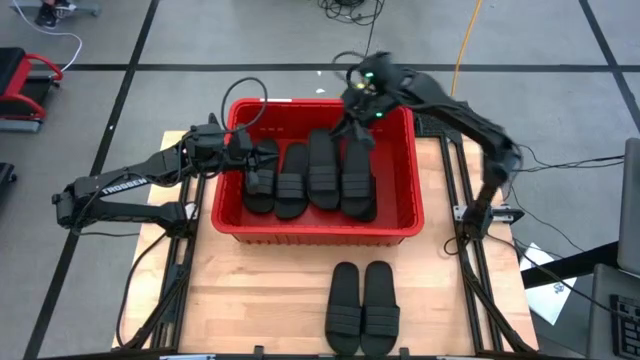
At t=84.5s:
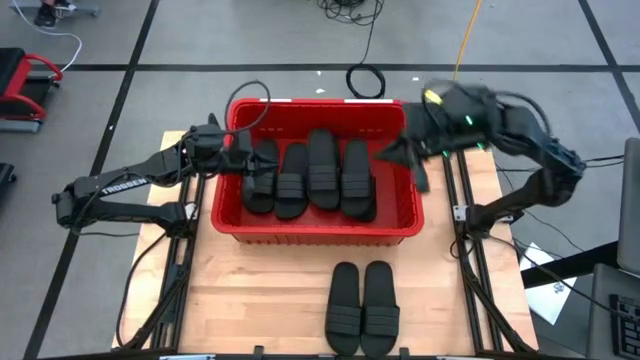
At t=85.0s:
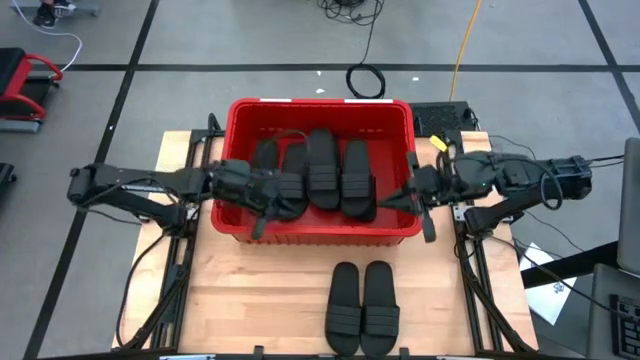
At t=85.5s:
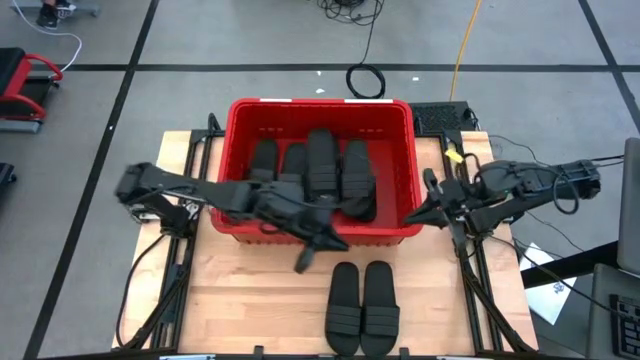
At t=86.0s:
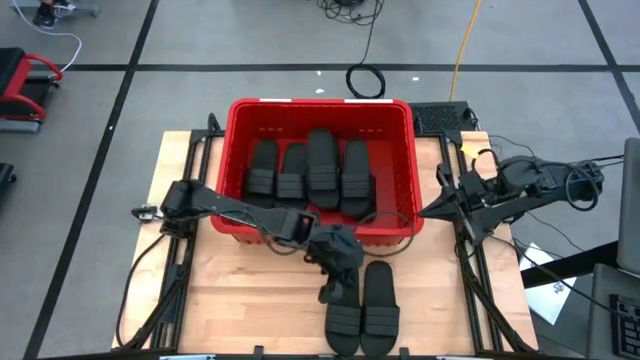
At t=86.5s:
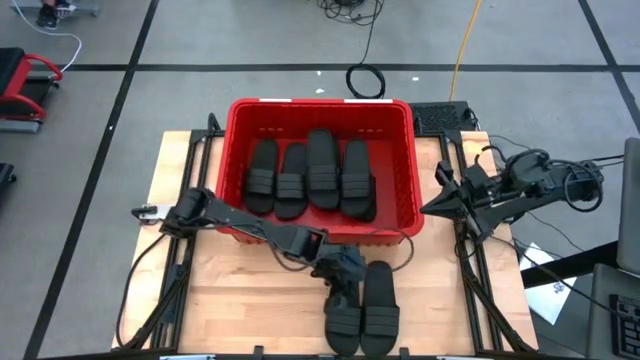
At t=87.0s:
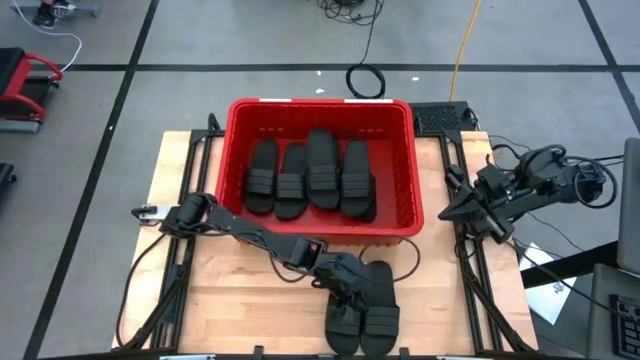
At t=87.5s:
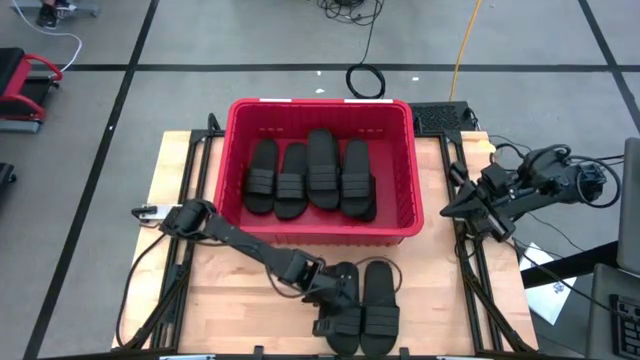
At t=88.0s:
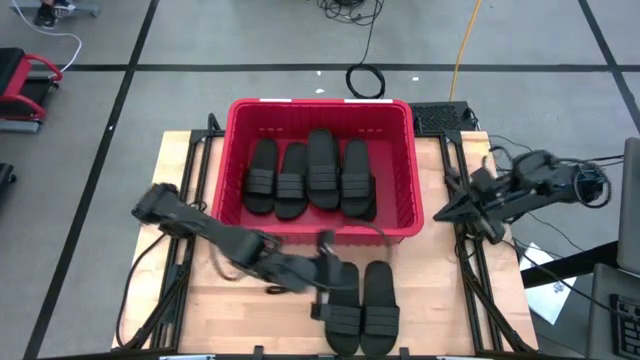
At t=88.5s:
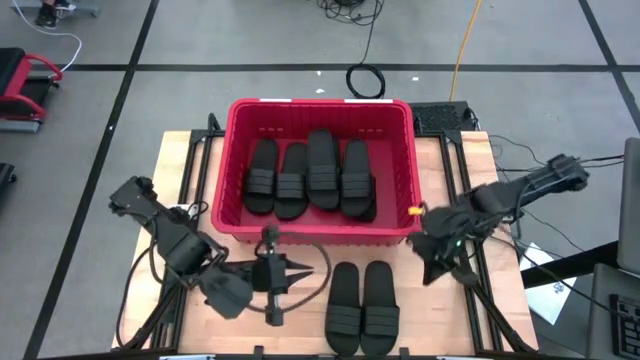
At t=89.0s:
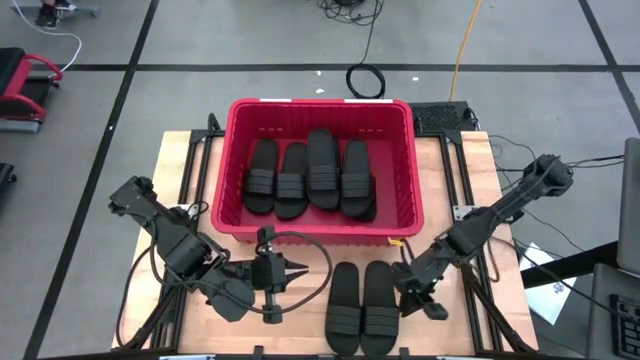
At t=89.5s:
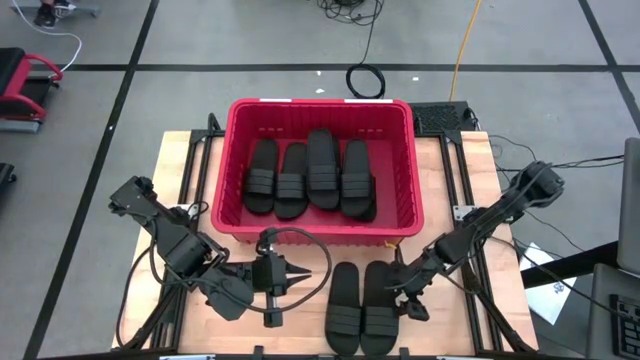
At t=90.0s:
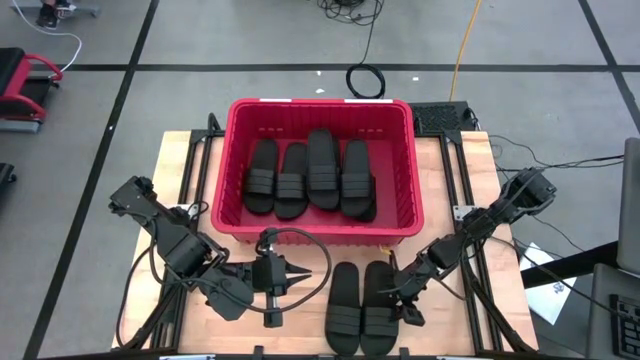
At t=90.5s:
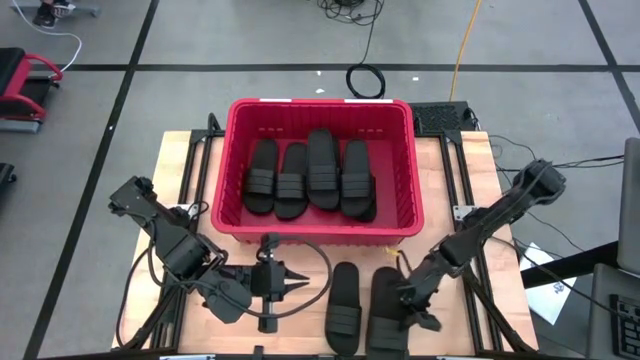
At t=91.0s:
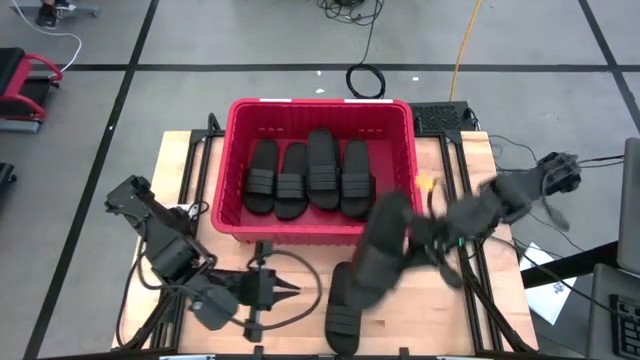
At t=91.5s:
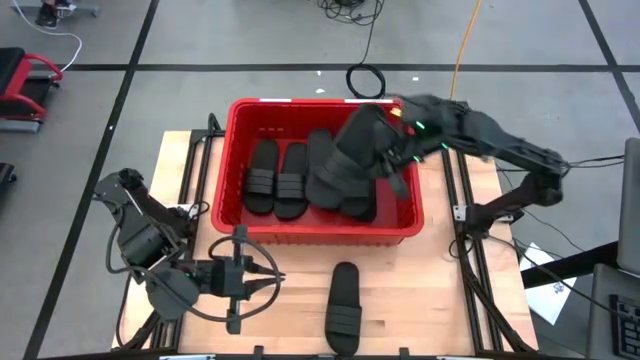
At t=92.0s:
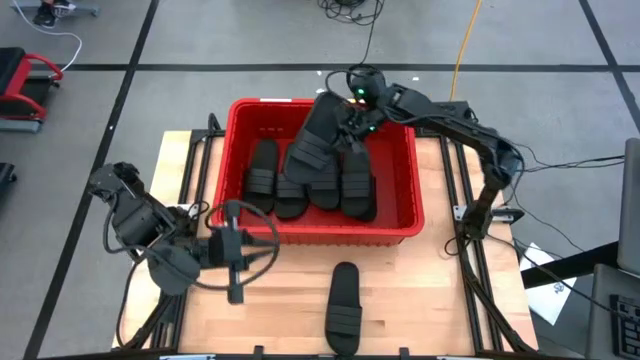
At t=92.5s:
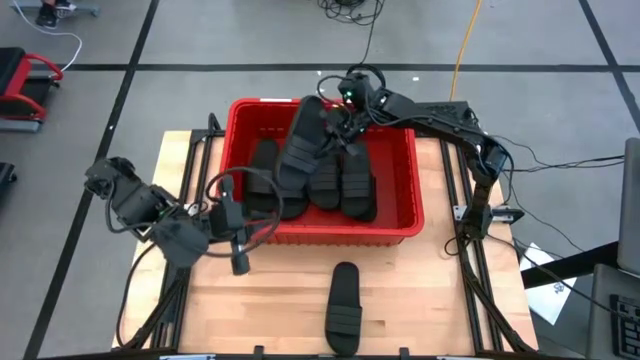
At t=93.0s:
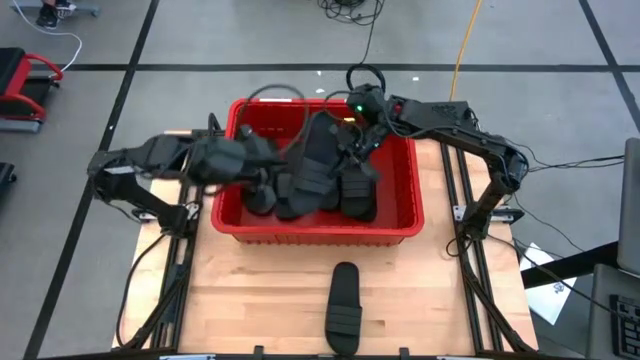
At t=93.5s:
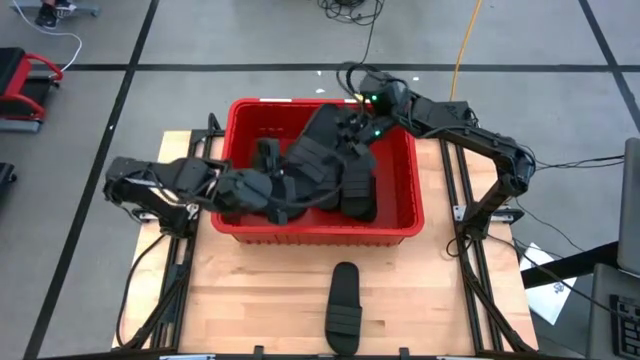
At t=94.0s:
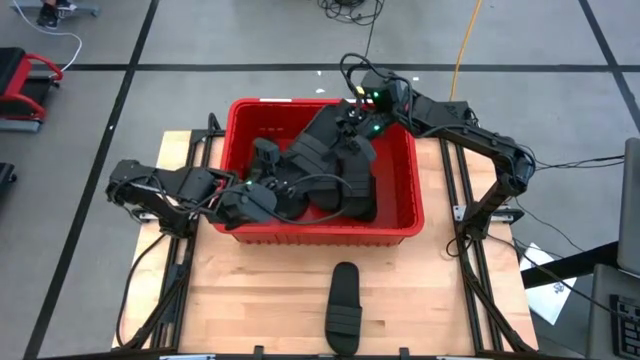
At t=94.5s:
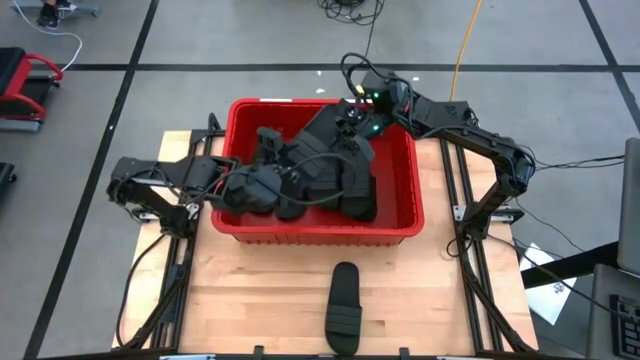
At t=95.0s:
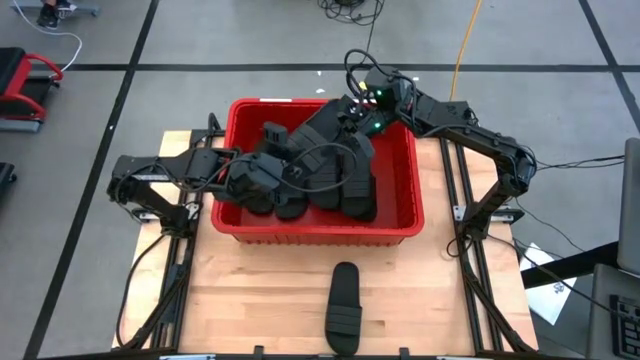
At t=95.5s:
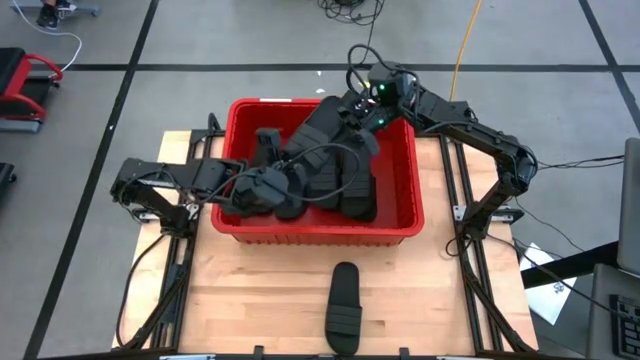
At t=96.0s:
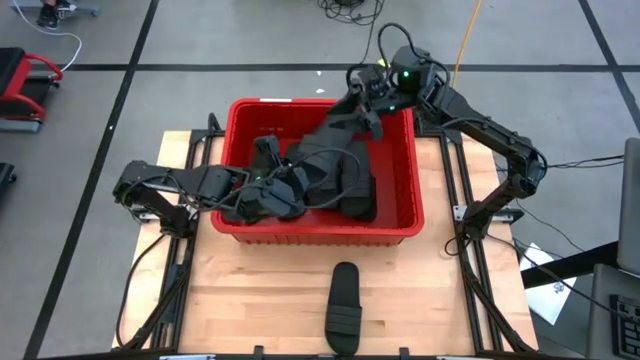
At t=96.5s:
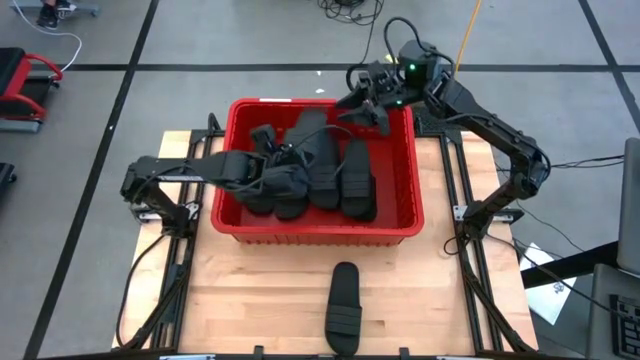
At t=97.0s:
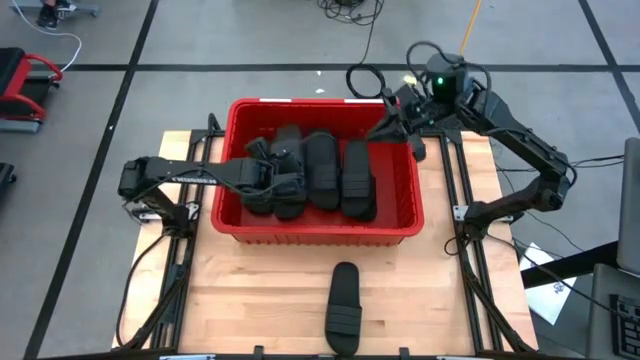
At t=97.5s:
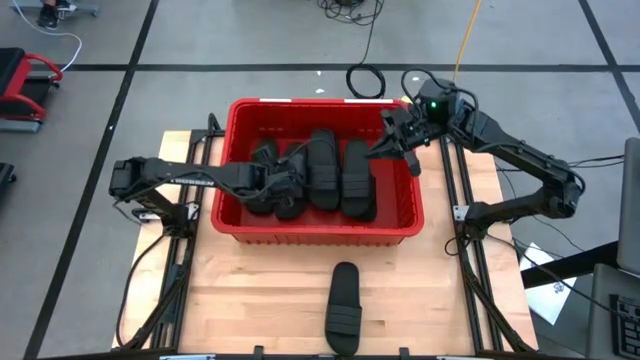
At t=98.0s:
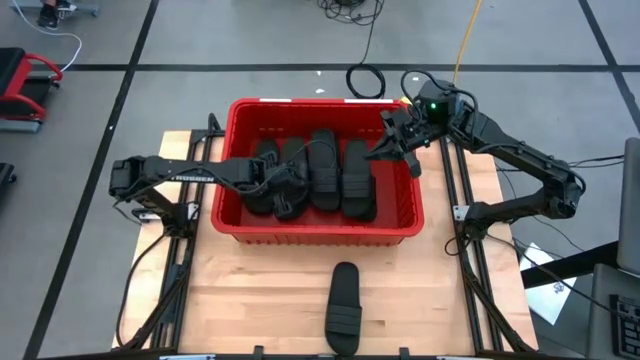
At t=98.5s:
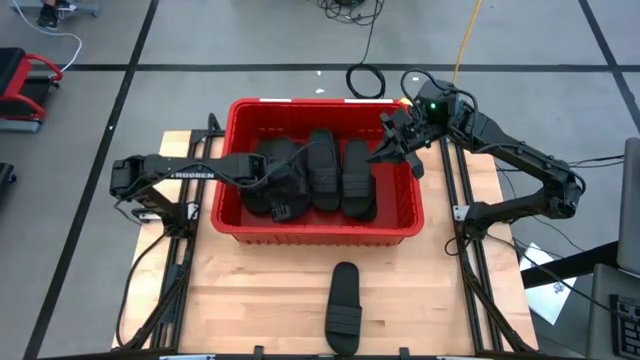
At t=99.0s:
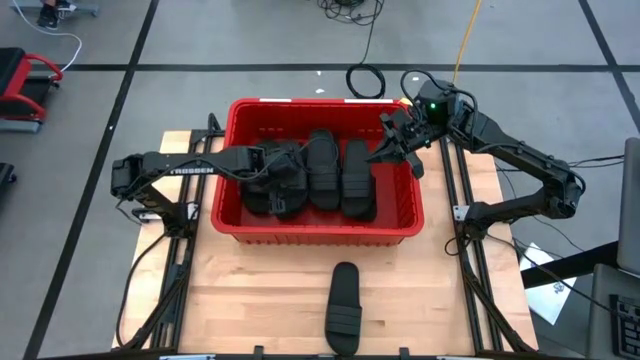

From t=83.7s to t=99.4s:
Task: Pick and place slides into bin
Put the black slide into the red bin

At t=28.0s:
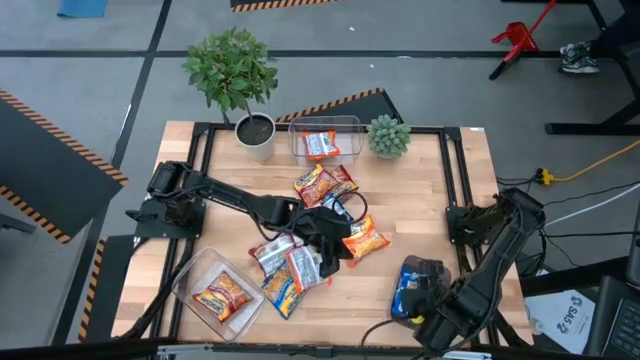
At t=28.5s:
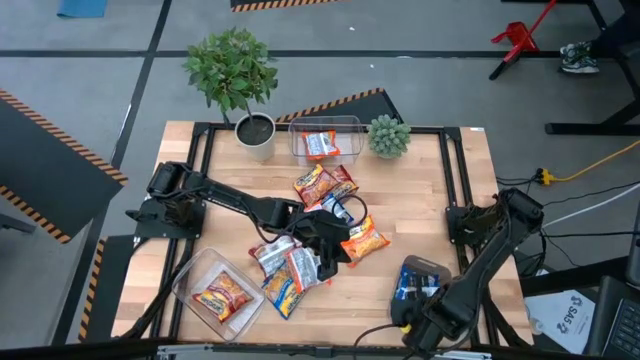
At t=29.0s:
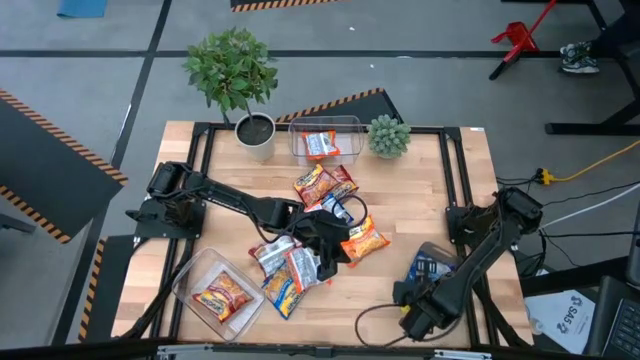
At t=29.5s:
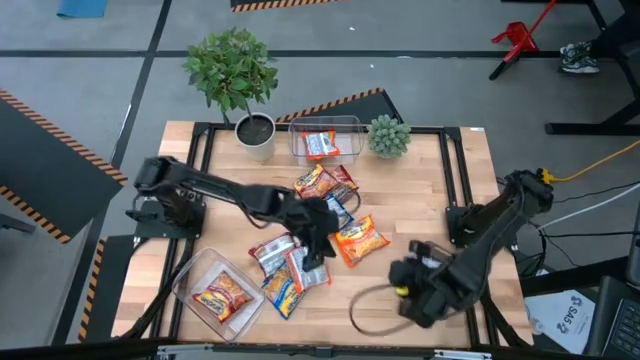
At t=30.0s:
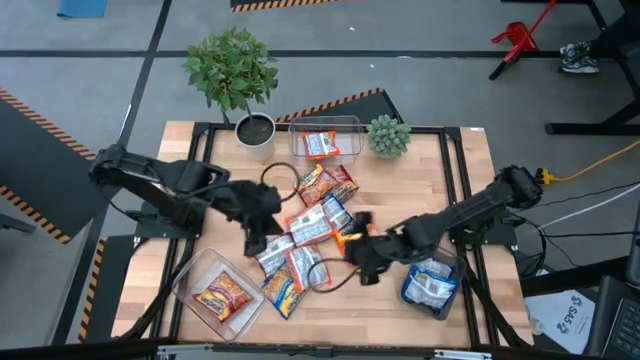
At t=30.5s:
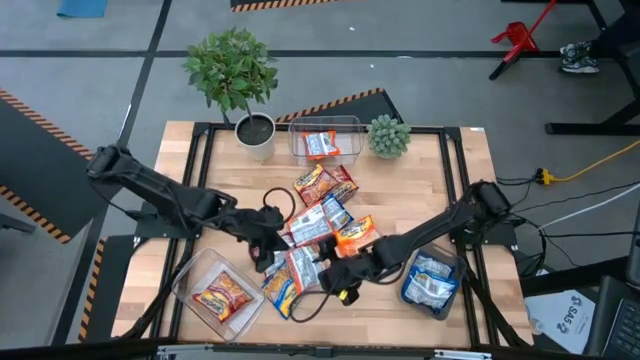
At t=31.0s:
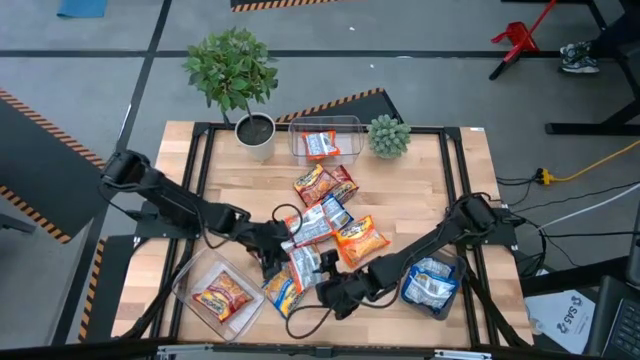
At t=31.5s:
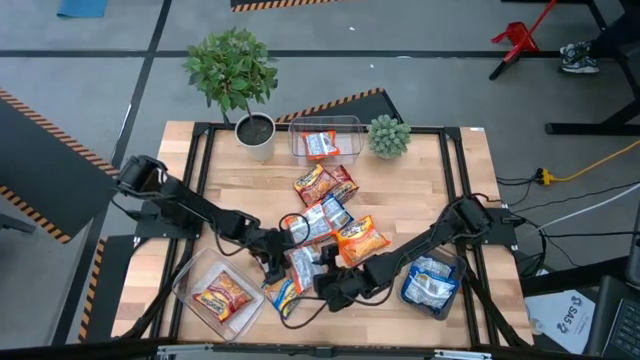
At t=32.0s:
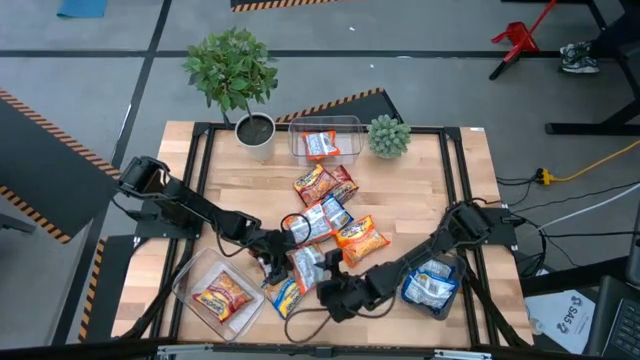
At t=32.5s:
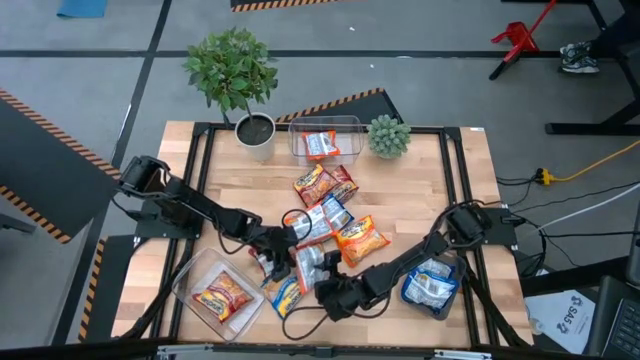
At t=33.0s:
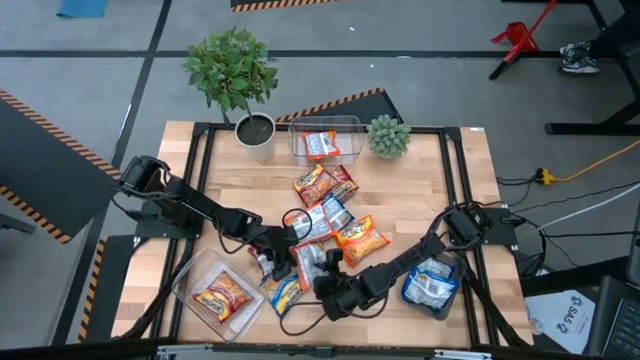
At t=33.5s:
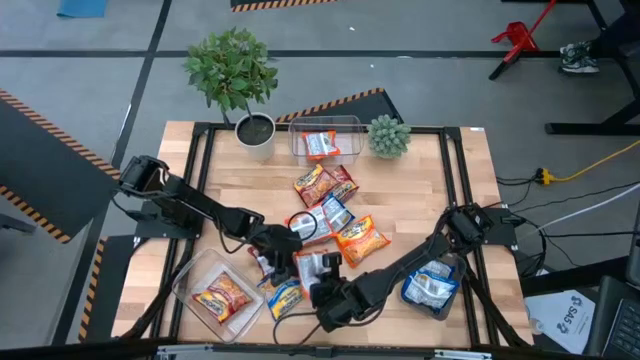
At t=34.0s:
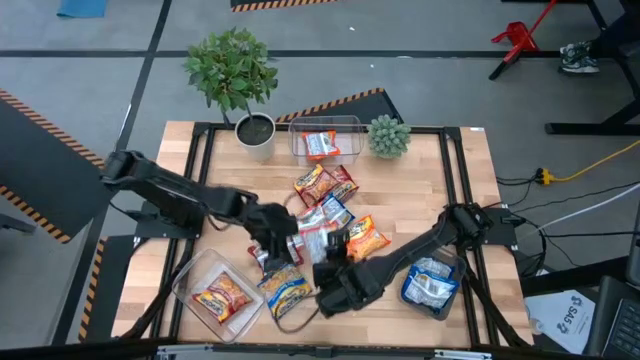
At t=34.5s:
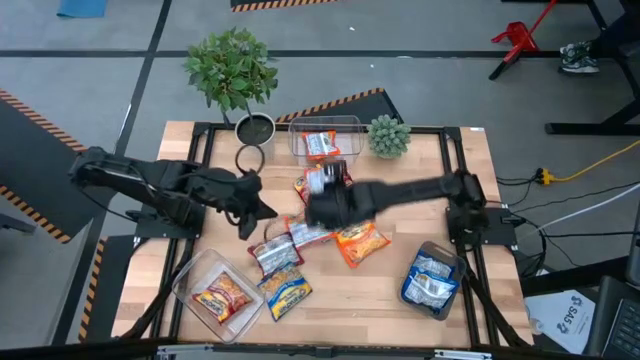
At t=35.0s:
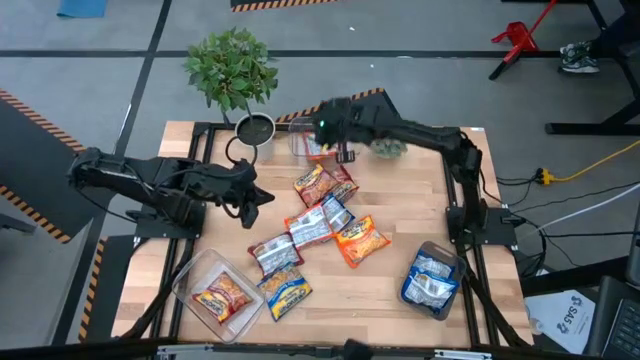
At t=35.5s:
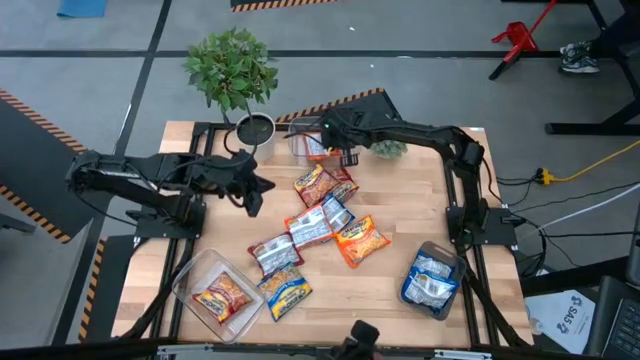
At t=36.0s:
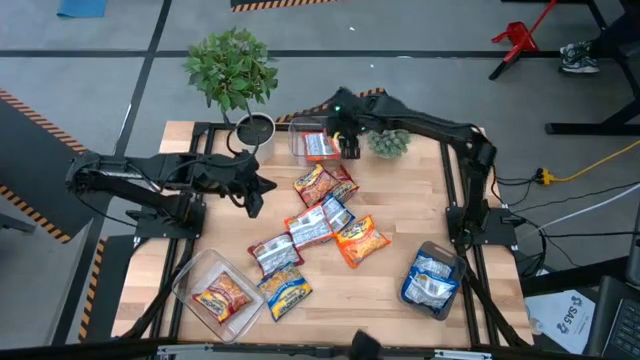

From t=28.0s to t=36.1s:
Task: Sort Maruchan noodles
Put the orange noodle pack into the top transparent bin
